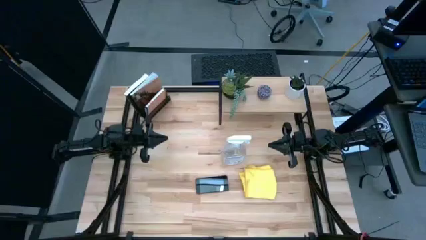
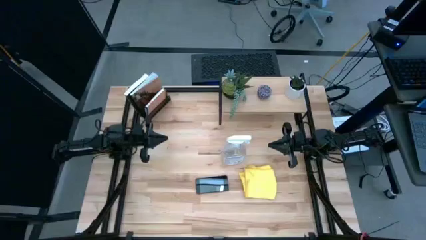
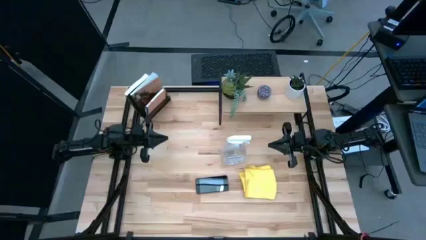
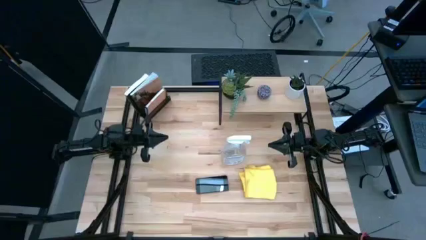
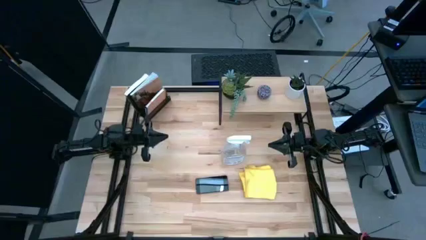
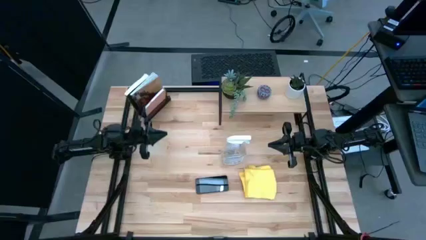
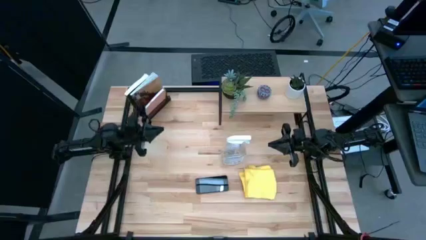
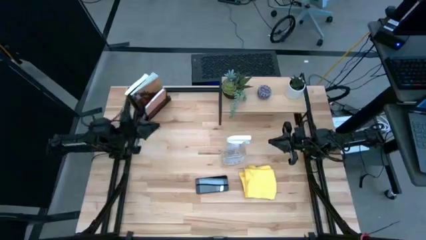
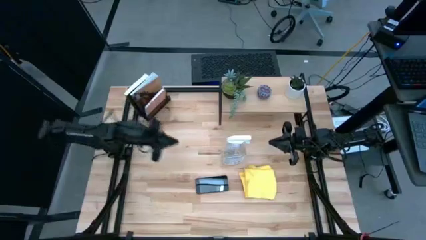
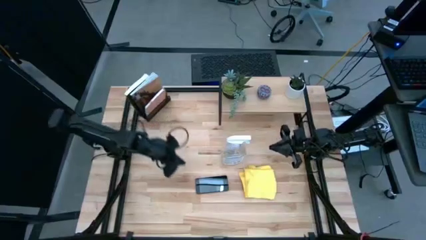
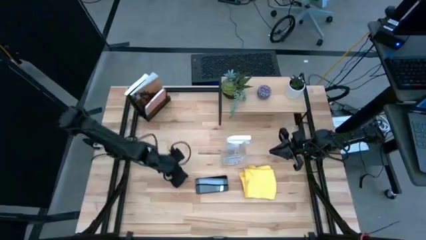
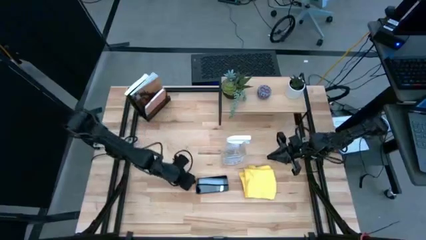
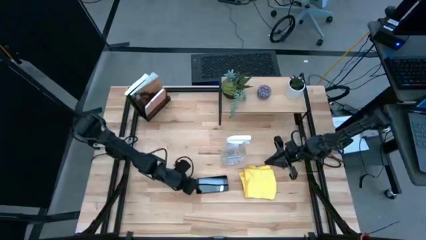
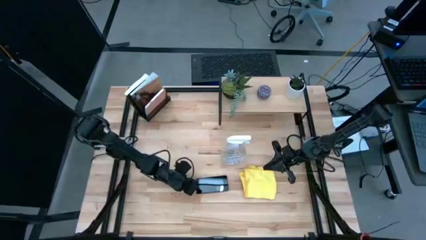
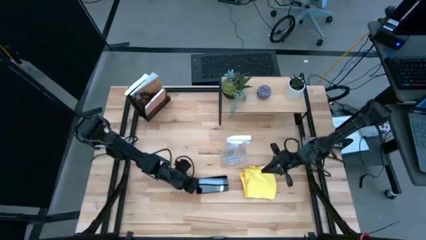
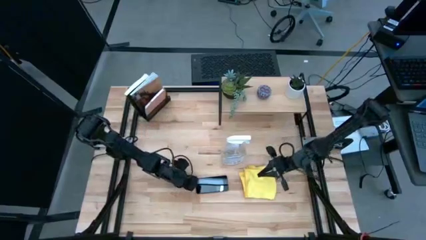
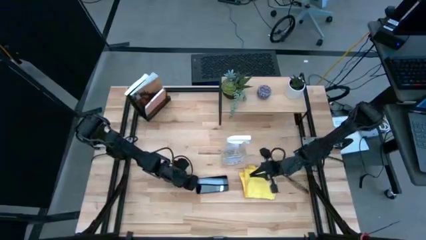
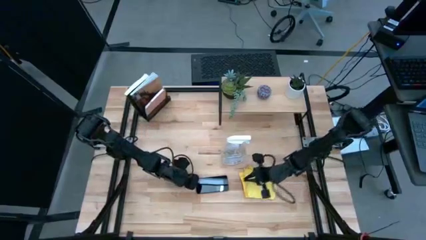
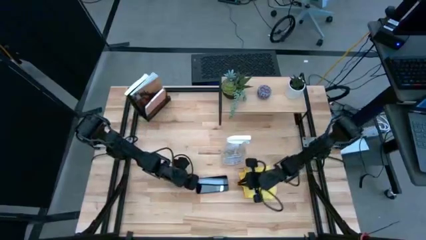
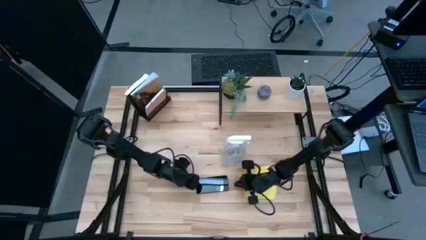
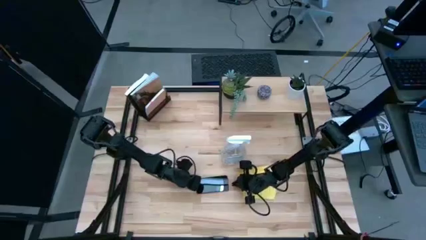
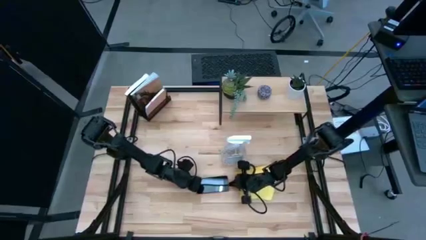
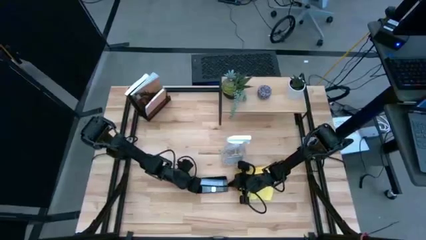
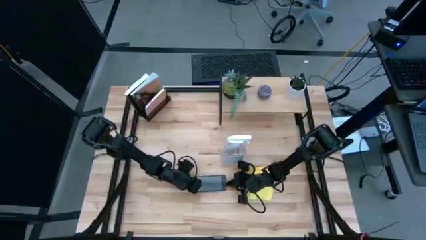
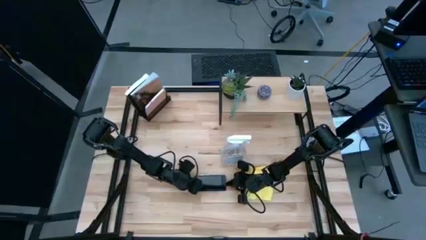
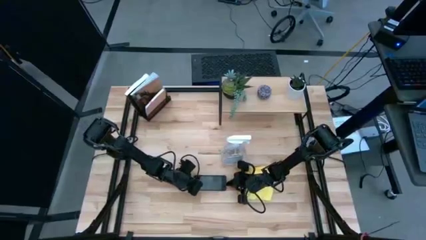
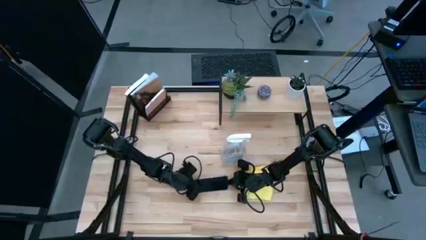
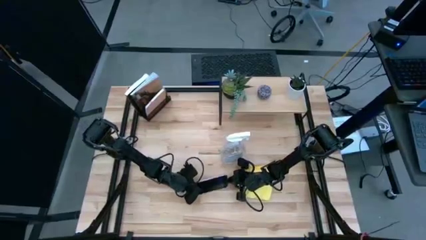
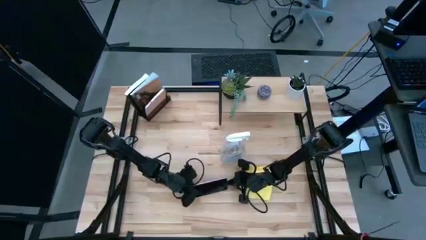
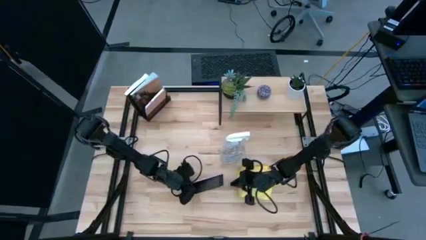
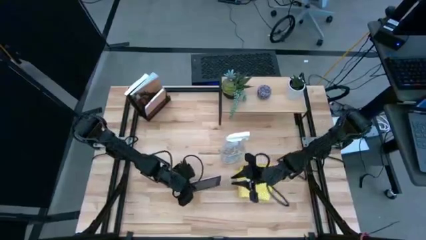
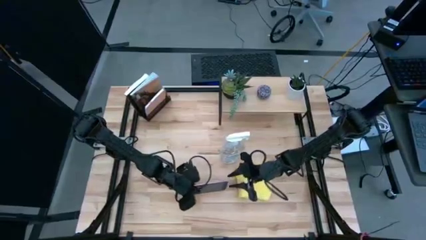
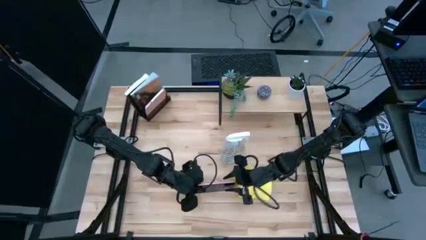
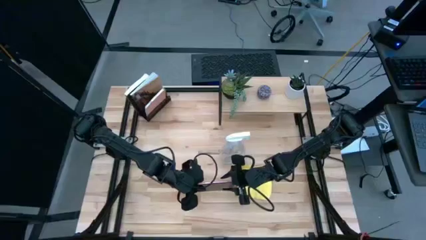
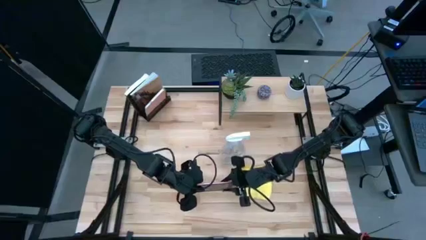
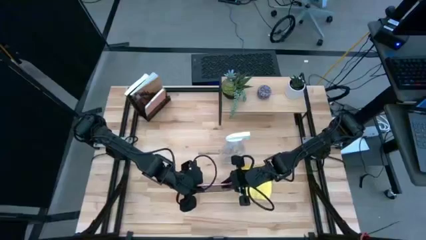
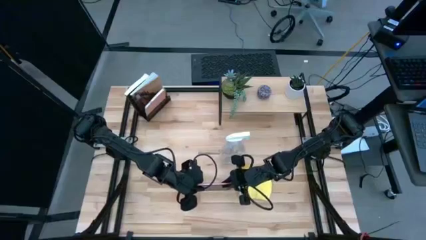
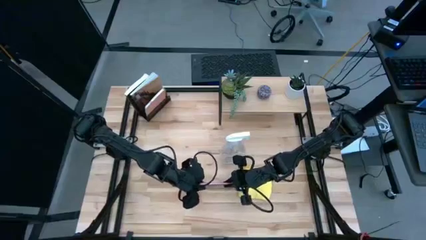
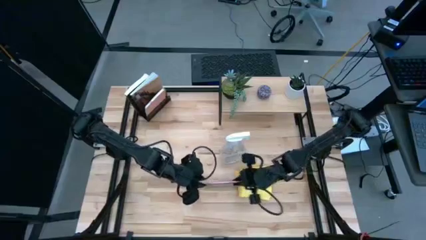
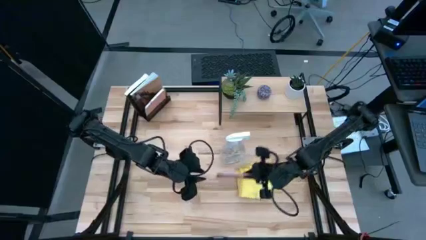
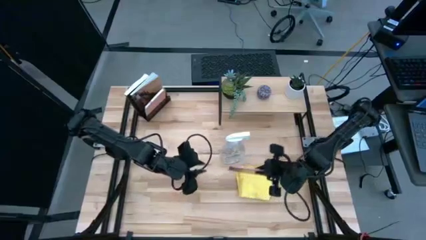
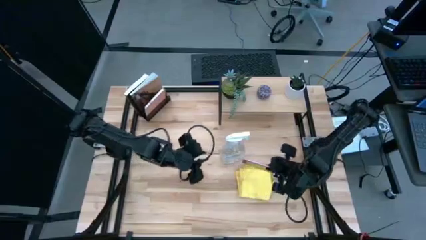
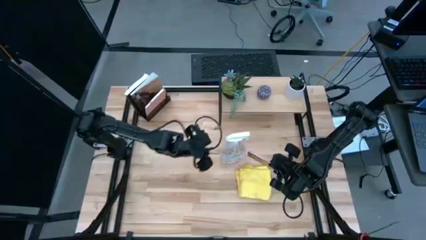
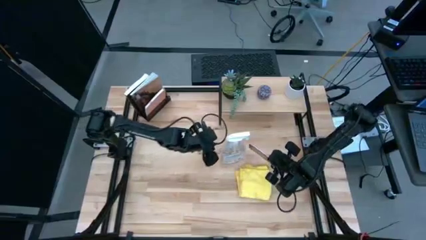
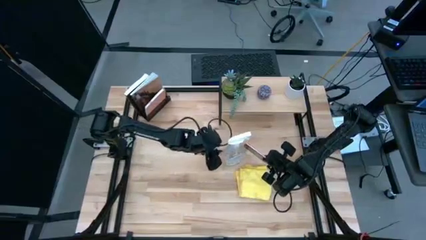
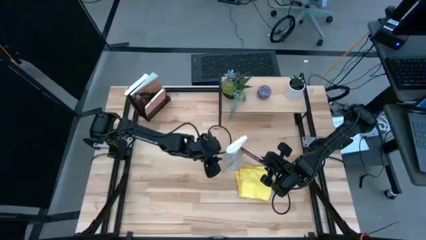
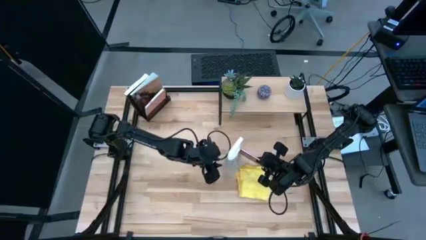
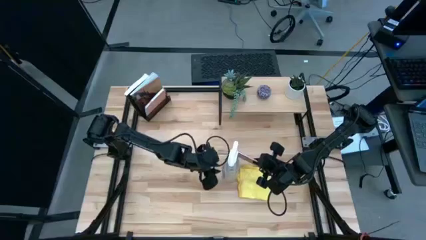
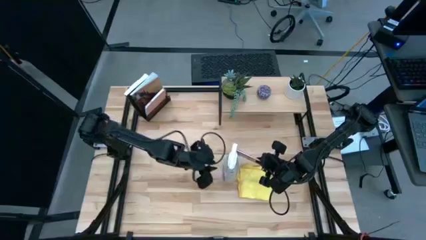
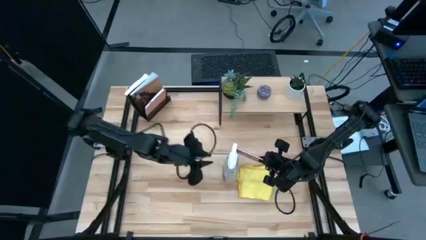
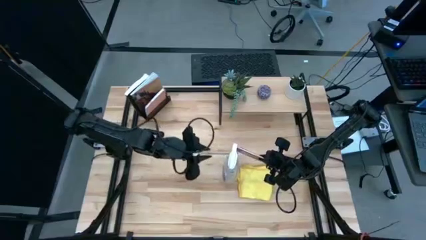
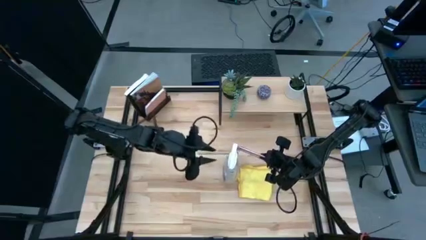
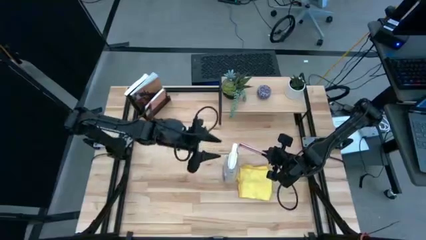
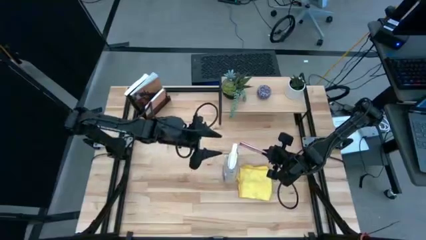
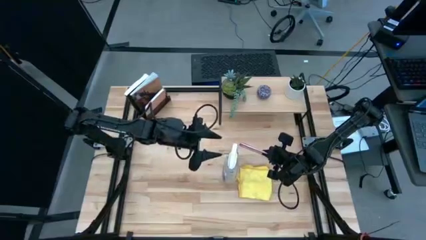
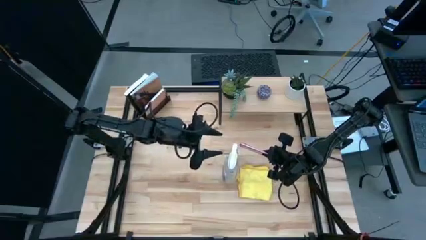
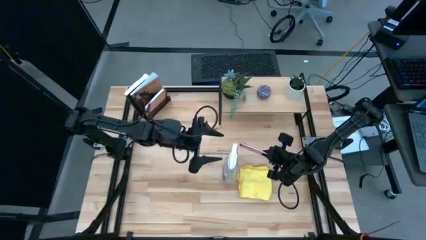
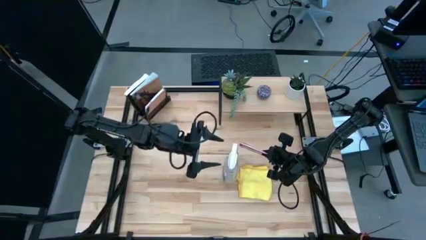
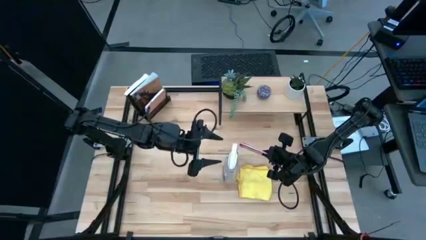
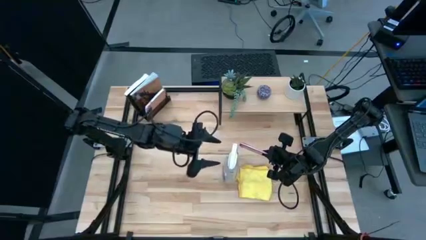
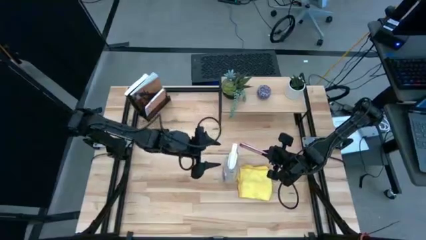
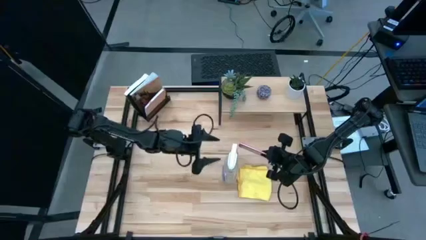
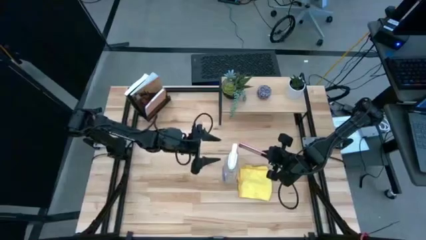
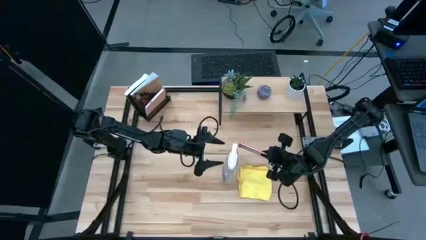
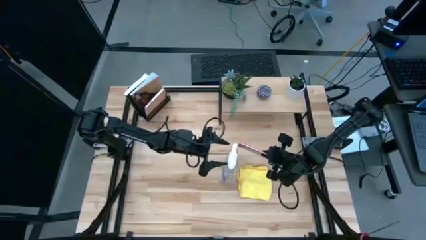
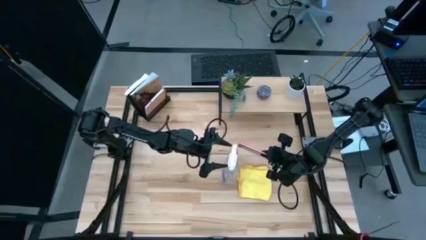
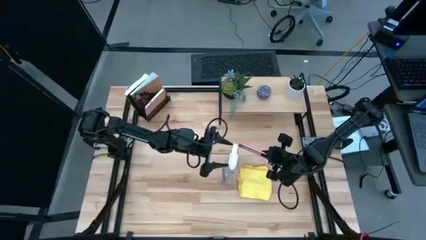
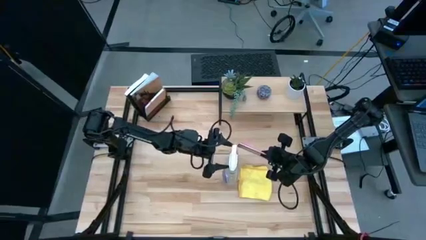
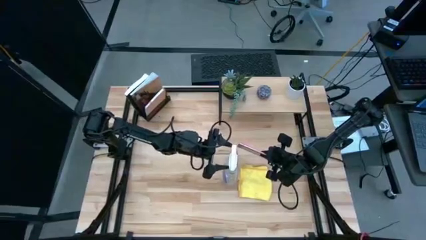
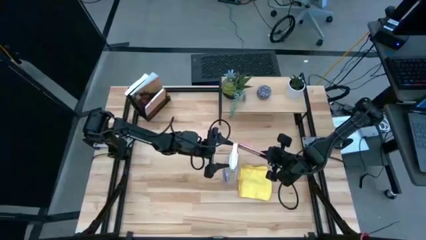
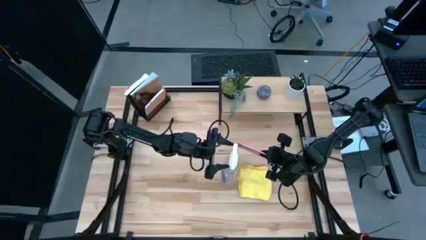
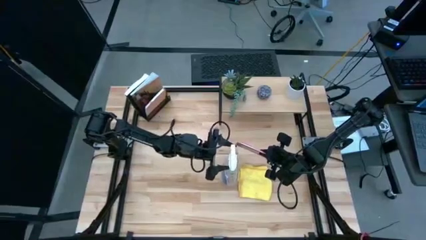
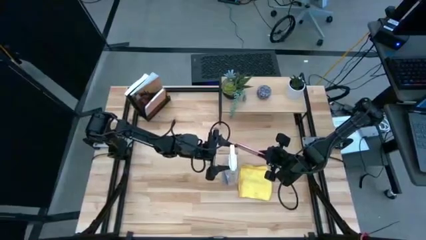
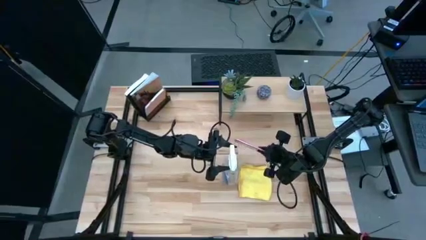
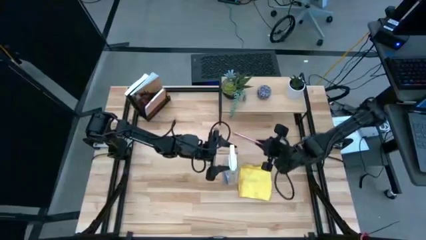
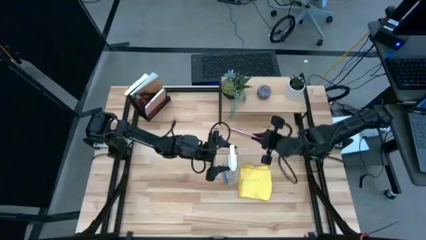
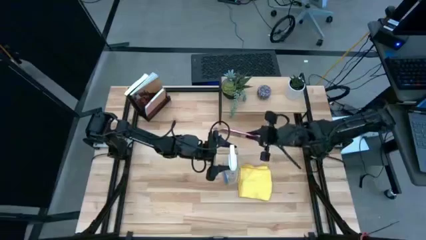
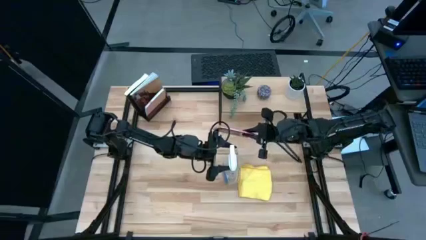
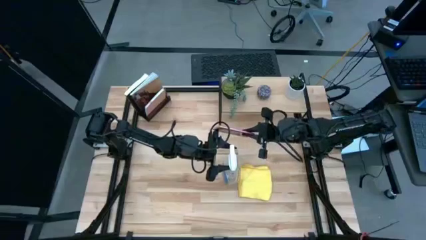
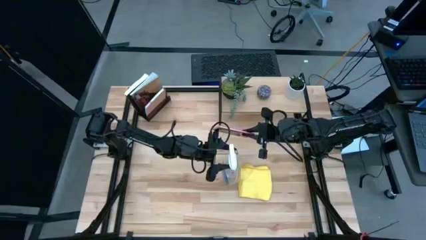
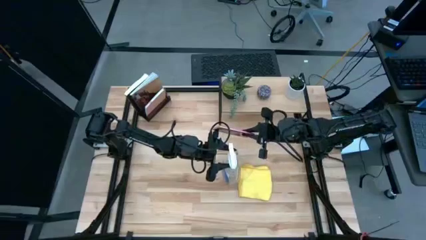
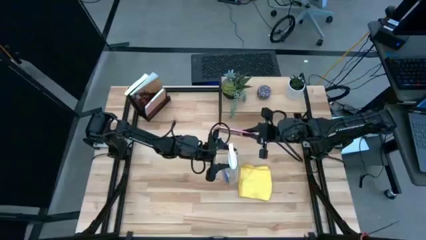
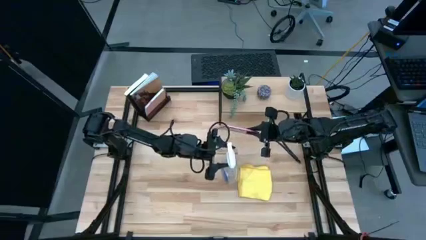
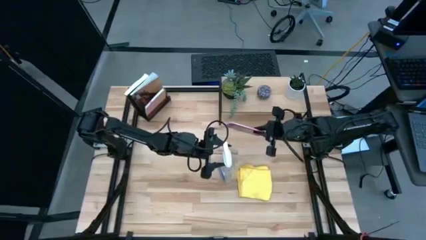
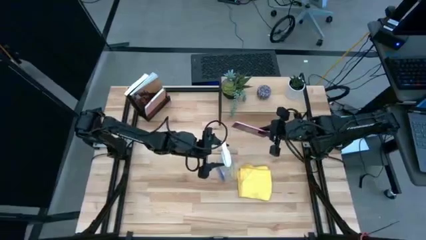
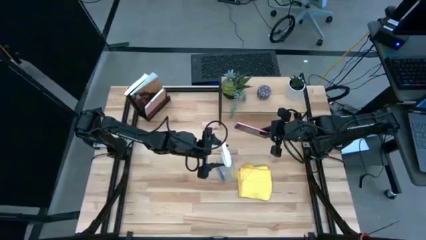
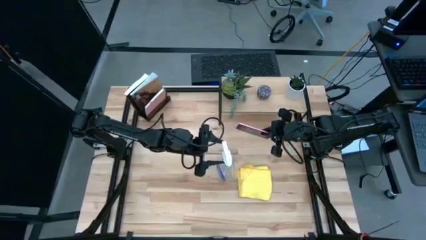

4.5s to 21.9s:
Task: Apply microfiber cloth
Spray the front of the cellphone using the glass cleaner spray
